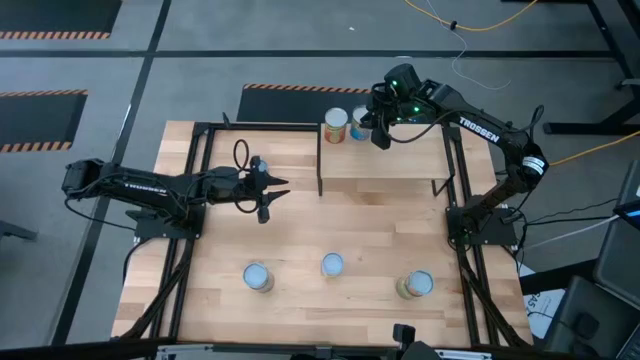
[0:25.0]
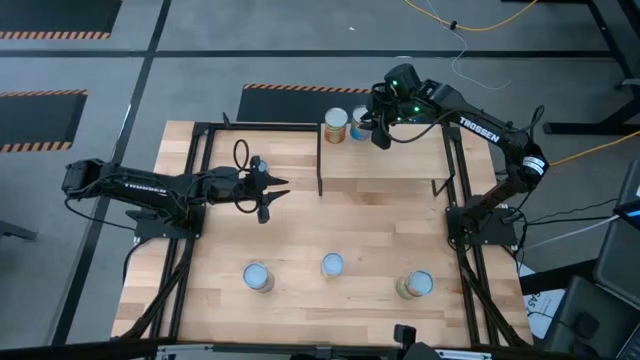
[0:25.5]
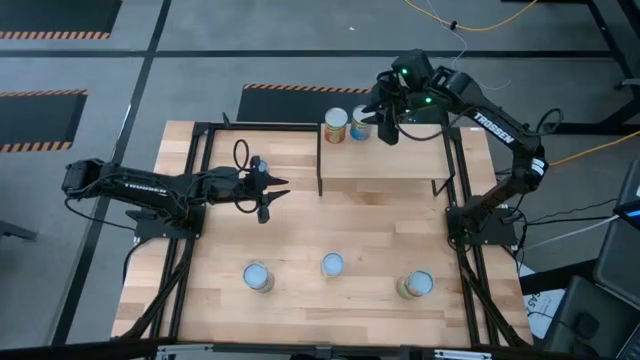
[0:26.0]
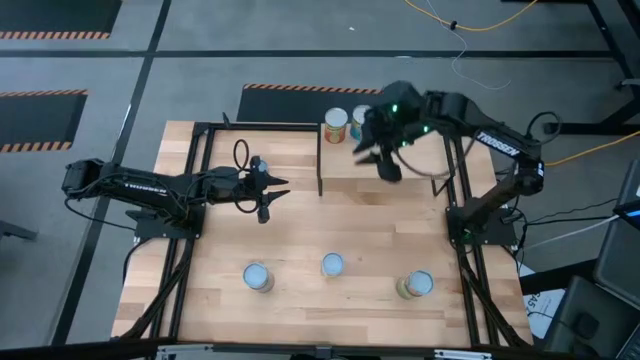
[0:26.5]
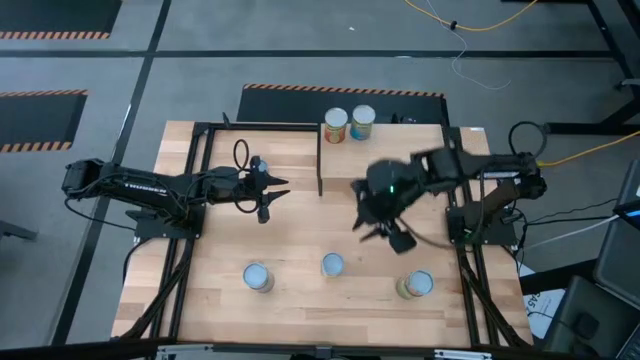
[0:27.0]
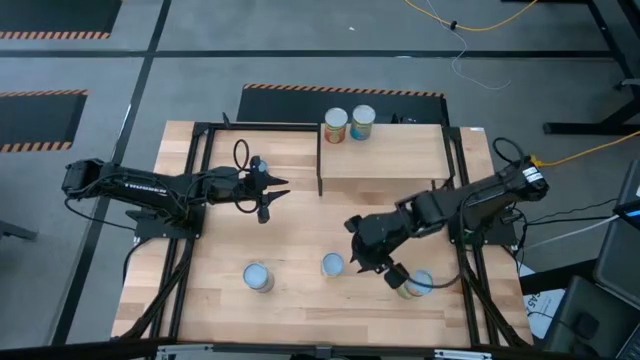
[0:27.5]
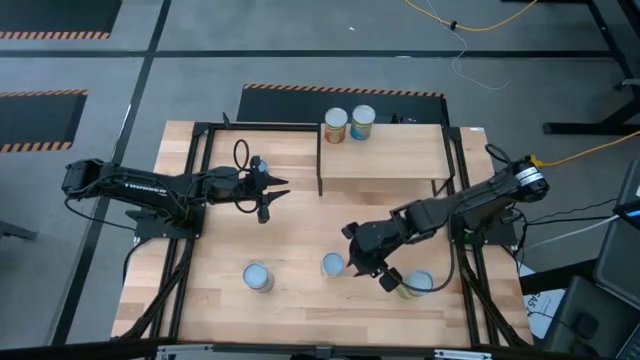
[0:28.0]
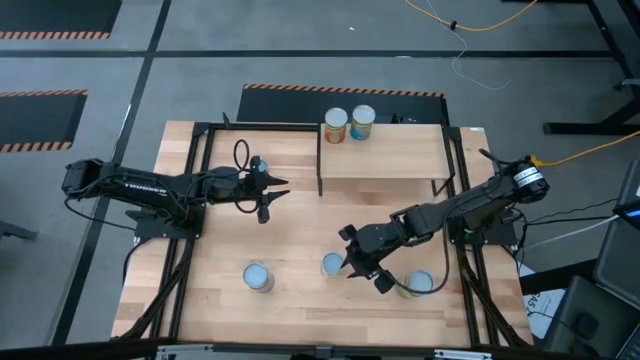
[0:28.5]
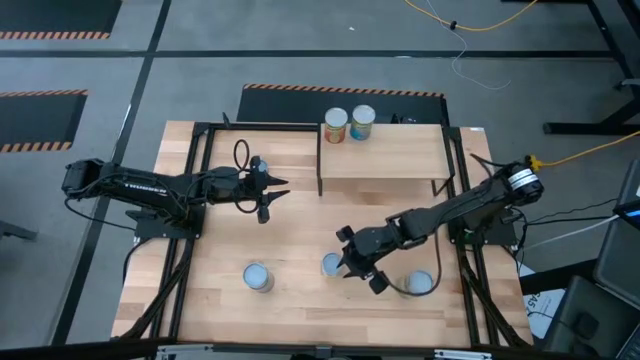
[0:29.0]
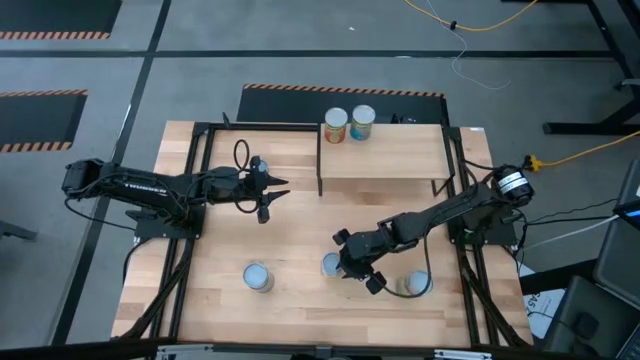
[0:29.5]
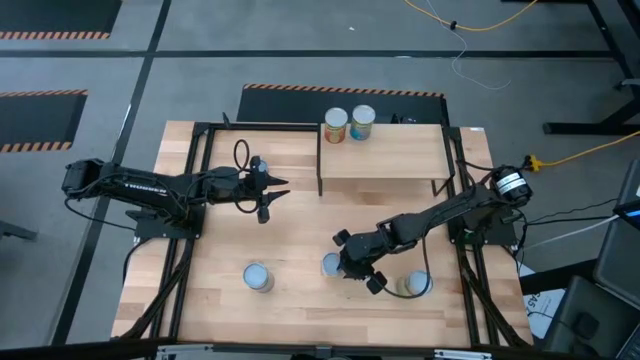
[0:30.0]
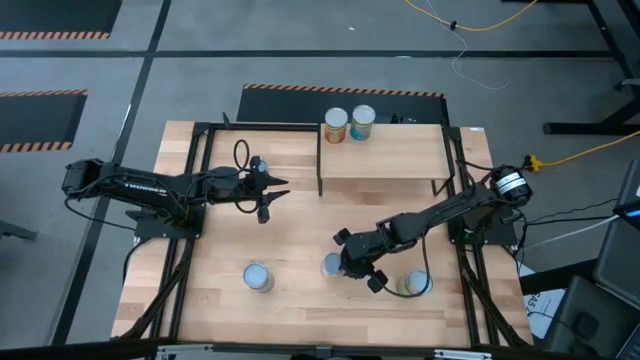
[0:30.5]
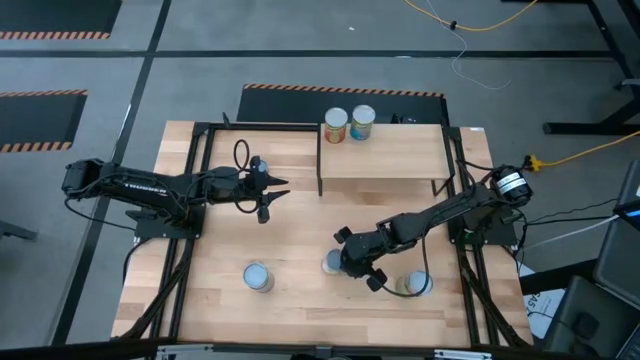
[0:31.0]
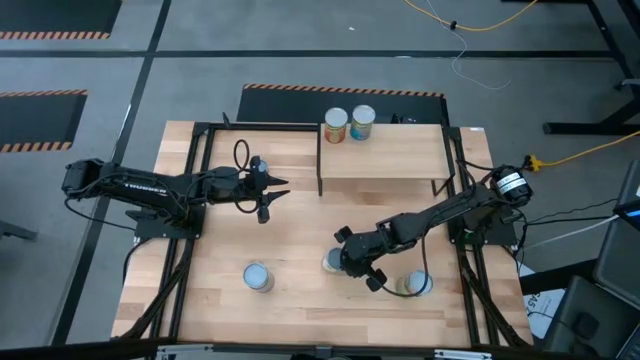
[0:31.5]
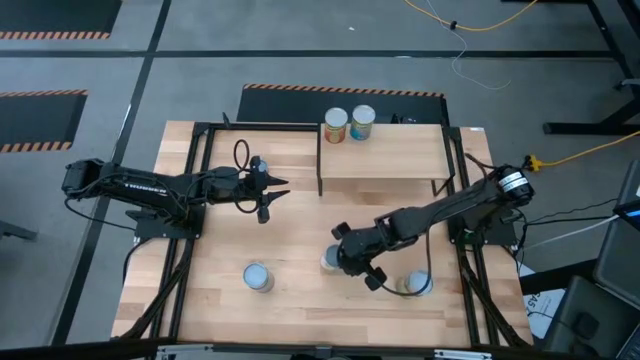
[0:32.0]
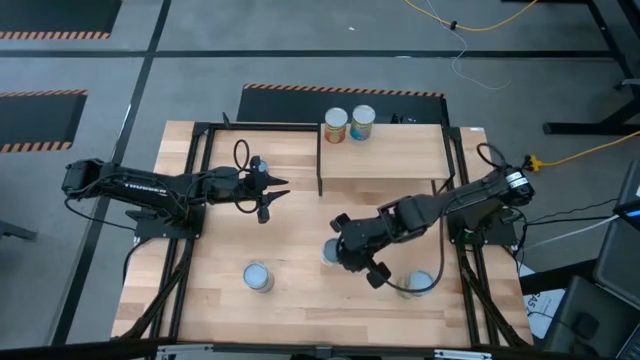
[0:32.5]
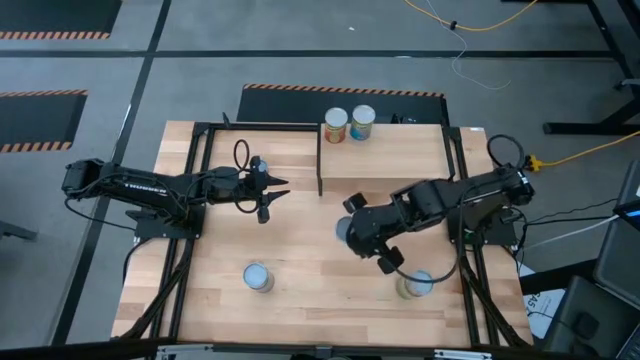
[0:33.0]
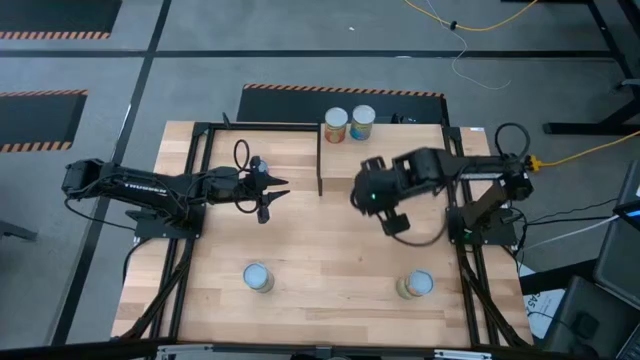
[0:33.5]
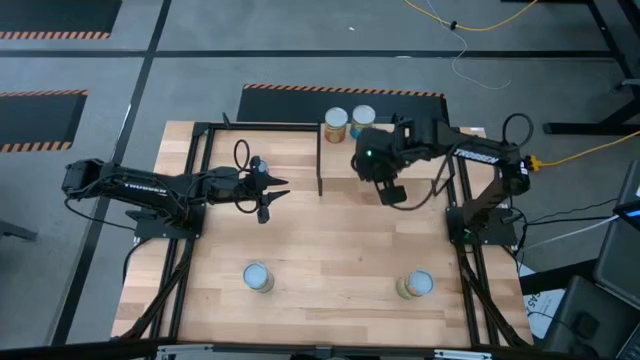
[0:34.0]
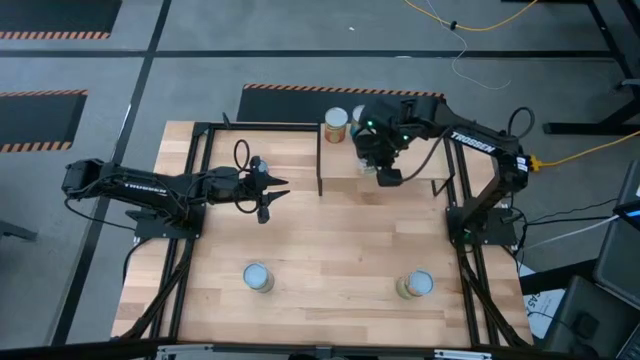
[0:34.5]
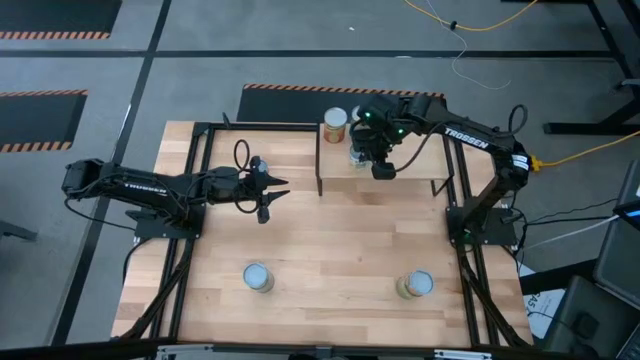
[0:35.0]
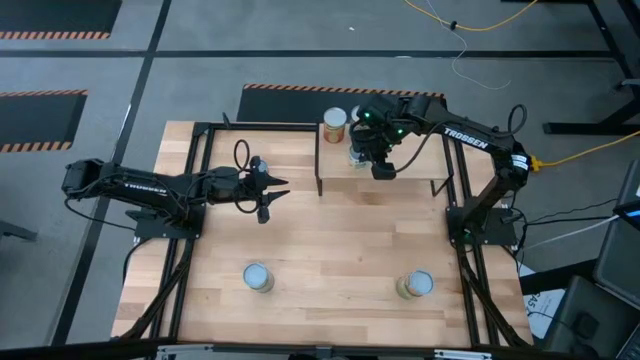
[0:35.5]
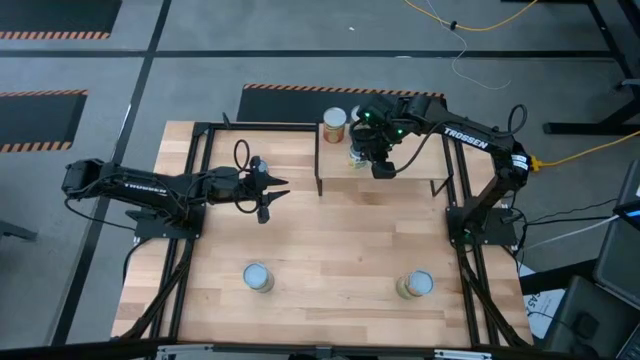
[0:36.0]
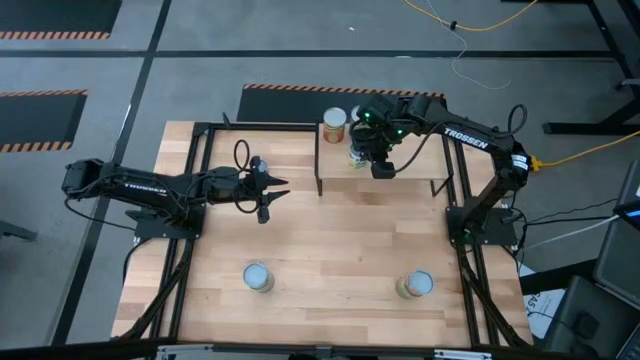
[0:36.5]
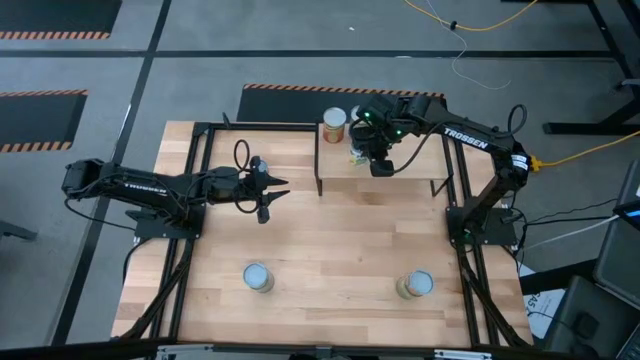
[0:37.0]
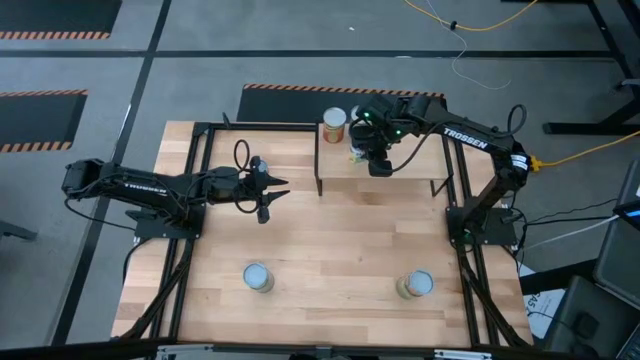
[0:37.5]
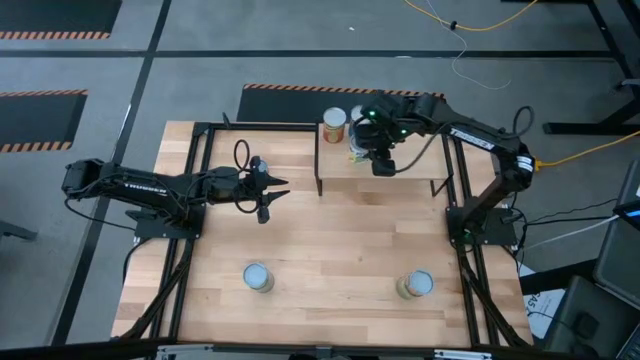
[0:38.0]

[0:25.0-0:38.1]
Task: Pick and place cans onto a shelf
Put the white canned mixed fruits on the shelf

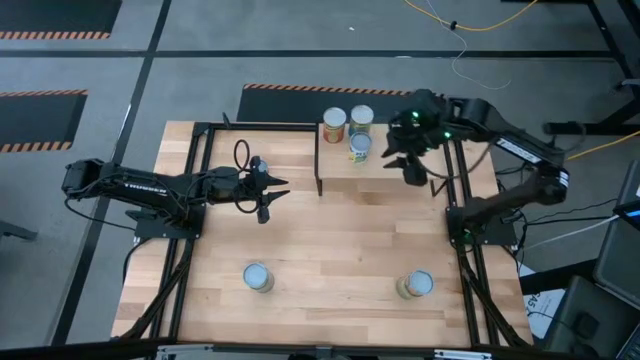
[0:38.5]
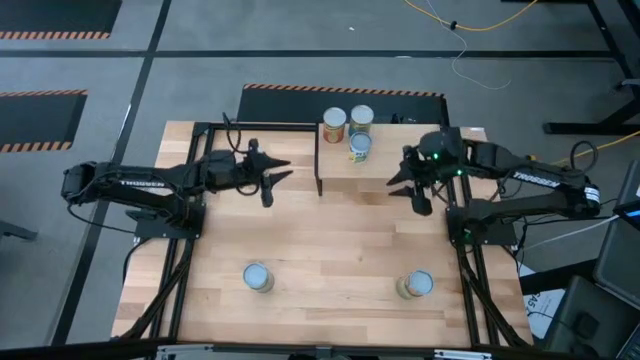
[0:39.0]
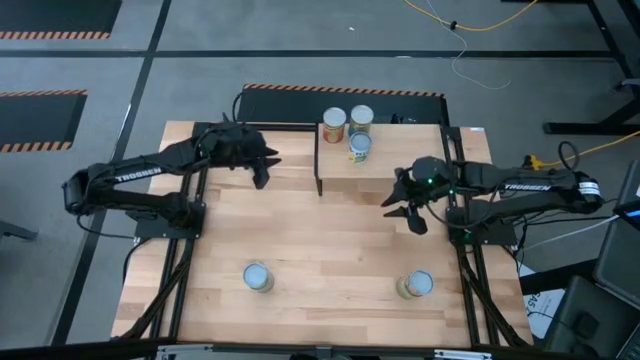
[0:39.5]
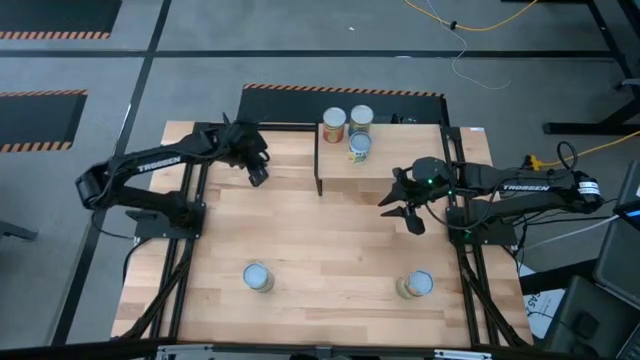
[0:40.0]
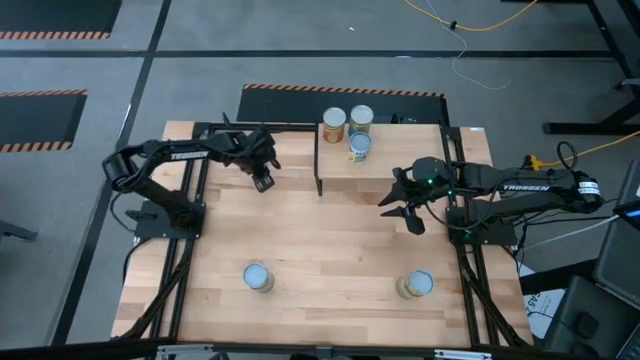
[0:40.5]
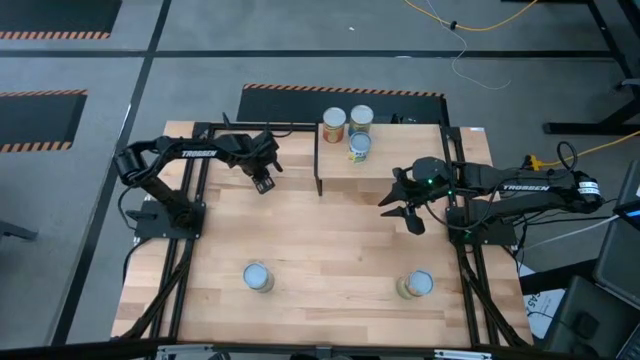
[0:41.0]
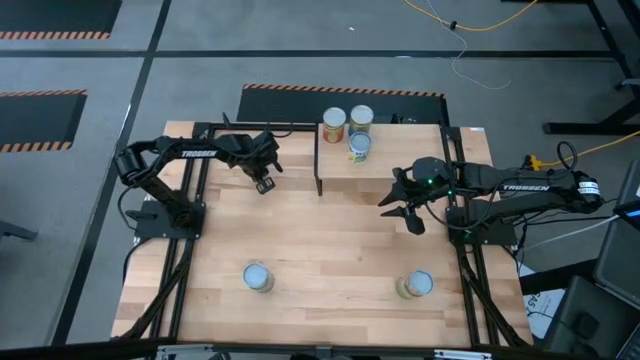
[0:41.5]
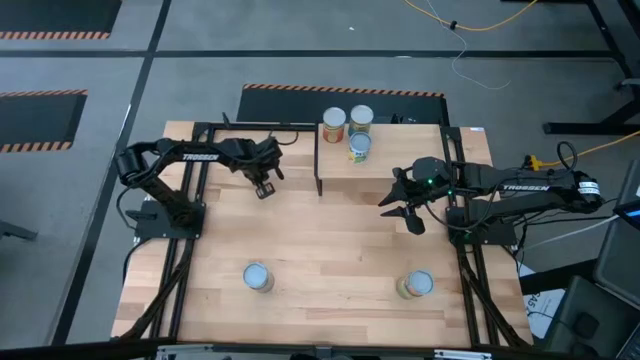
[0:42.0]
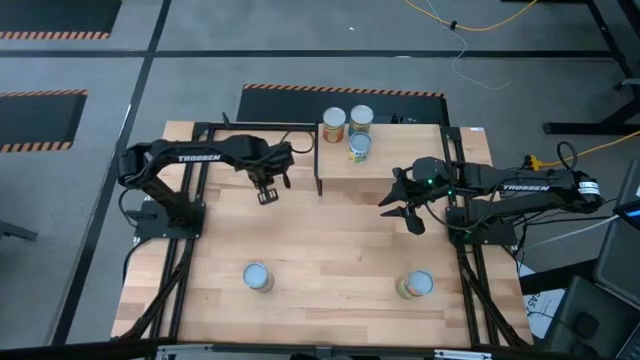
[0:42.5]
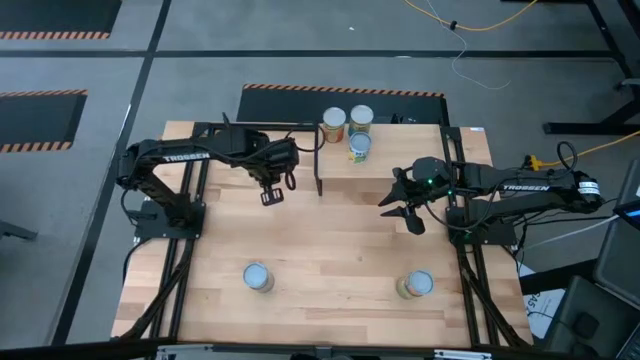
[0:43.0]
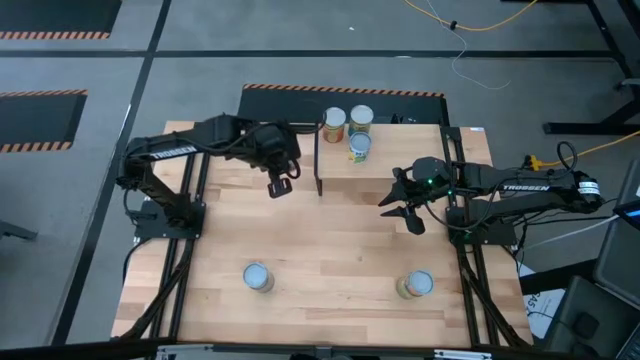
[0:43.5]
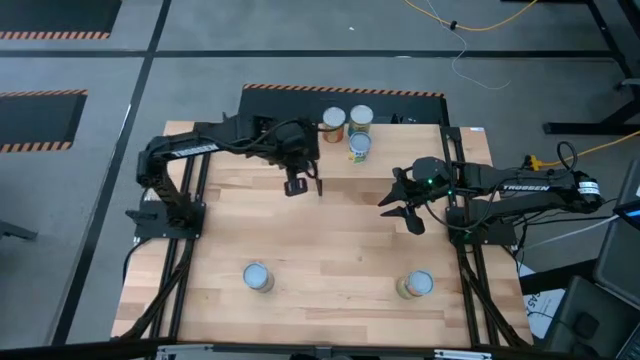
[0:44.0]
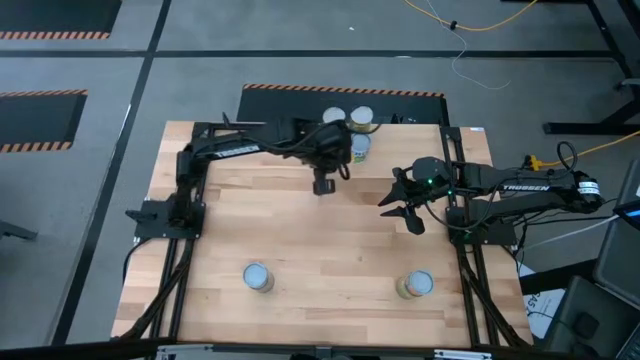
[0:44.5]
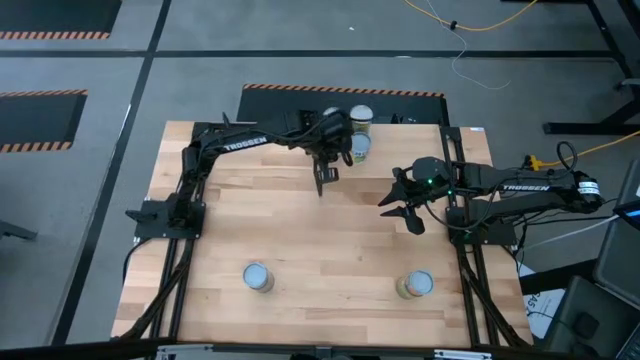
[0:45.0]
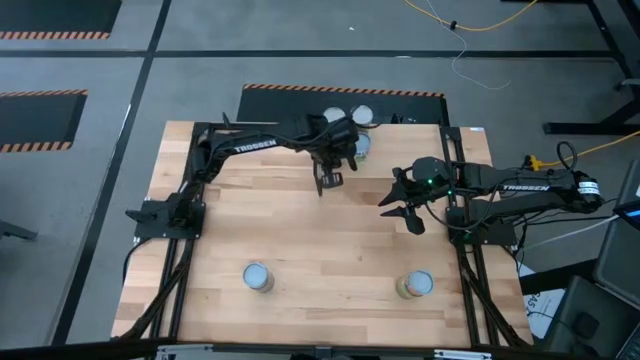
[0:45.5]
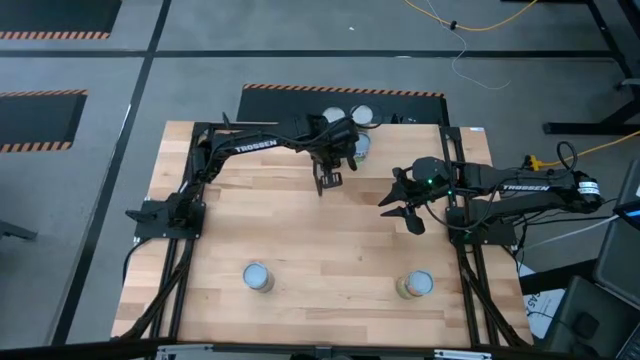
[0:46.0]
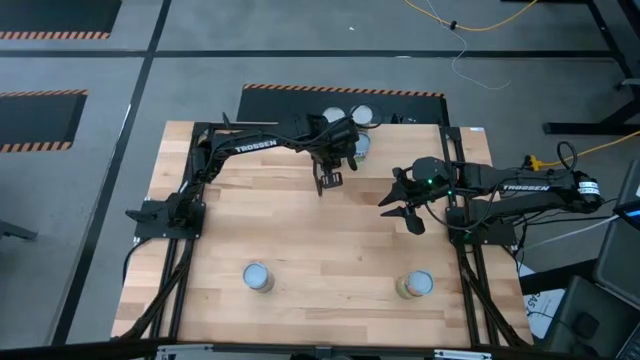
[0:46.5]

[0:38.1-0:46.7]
Put the yellow canned pineapple rings on the shelf
